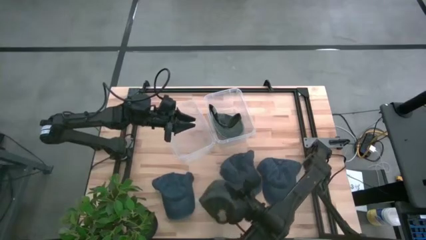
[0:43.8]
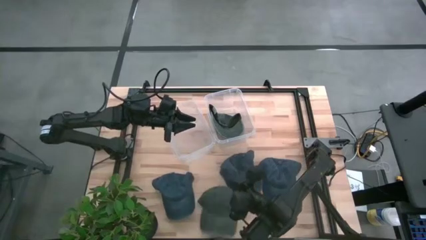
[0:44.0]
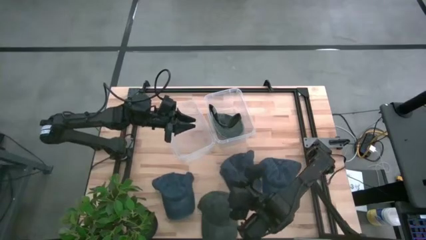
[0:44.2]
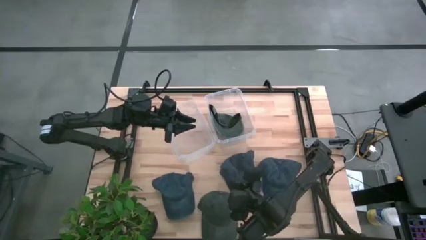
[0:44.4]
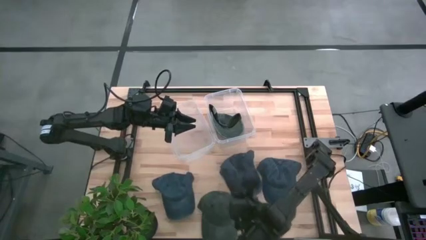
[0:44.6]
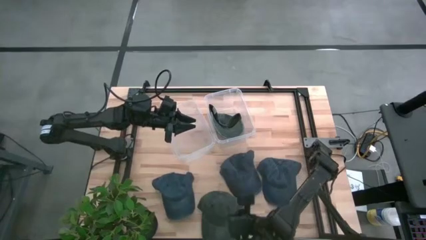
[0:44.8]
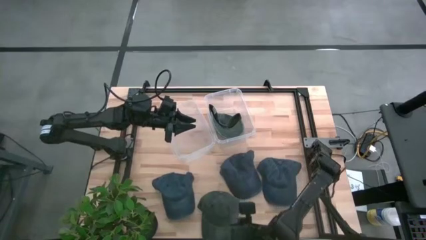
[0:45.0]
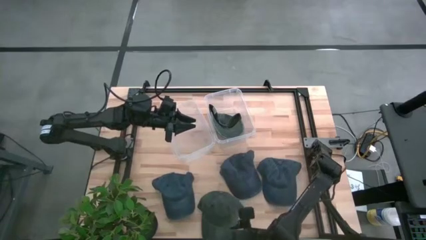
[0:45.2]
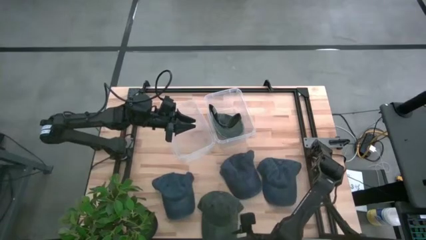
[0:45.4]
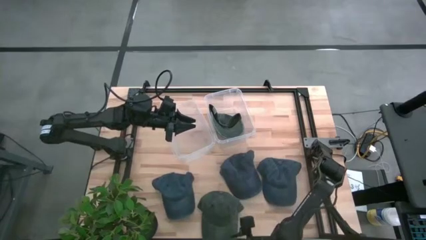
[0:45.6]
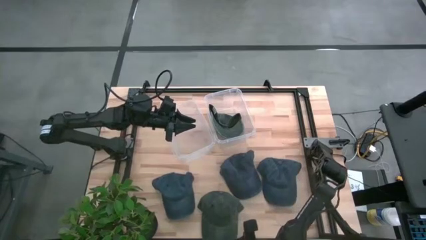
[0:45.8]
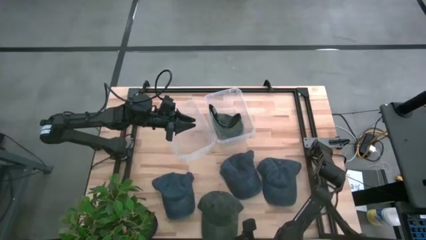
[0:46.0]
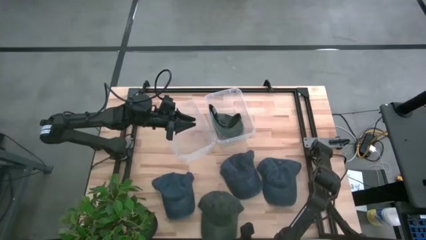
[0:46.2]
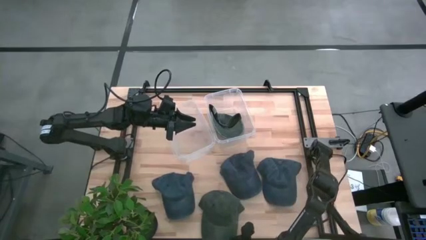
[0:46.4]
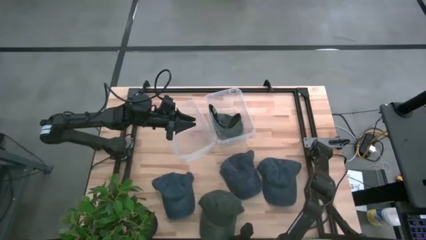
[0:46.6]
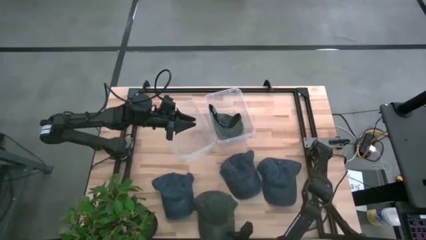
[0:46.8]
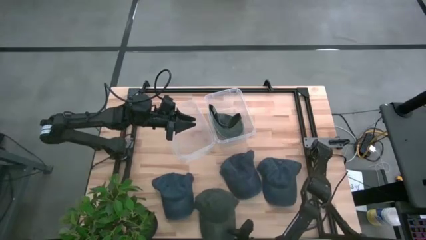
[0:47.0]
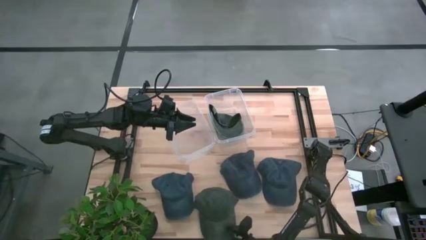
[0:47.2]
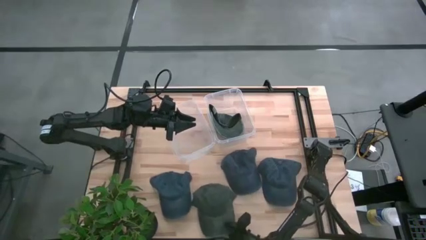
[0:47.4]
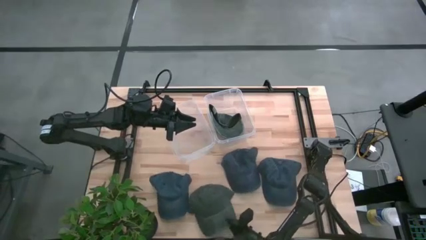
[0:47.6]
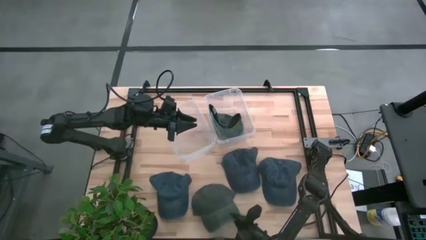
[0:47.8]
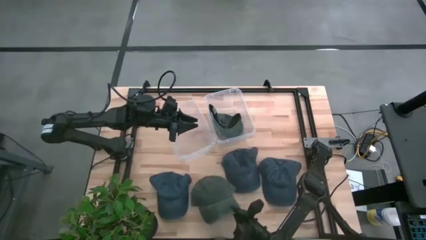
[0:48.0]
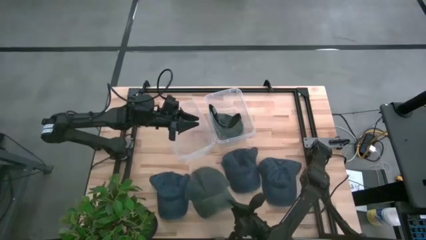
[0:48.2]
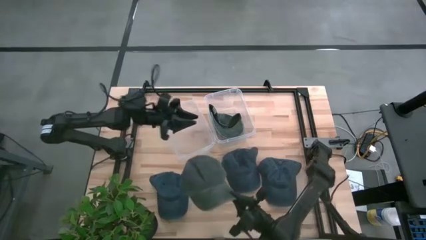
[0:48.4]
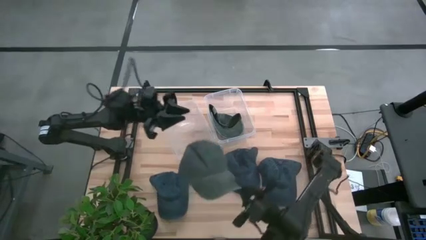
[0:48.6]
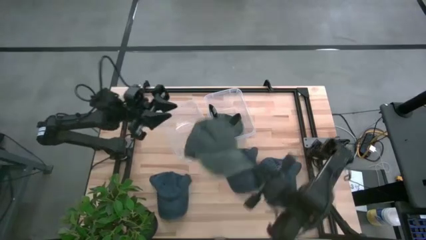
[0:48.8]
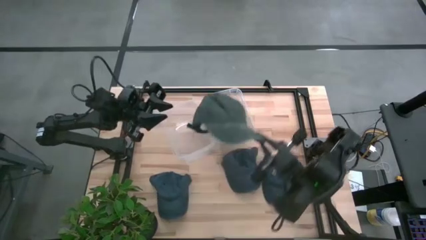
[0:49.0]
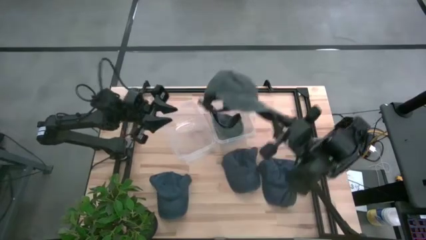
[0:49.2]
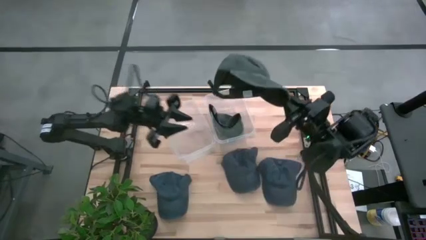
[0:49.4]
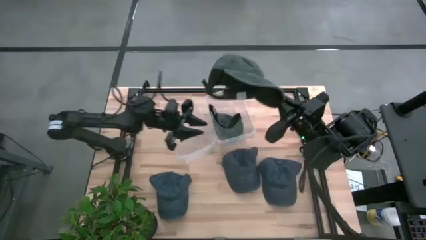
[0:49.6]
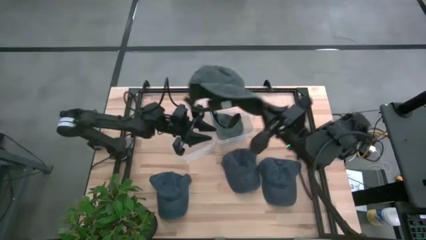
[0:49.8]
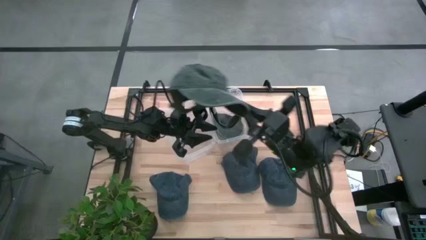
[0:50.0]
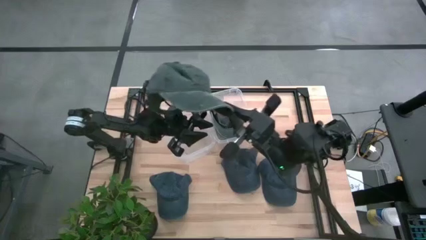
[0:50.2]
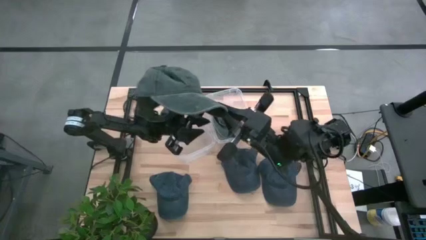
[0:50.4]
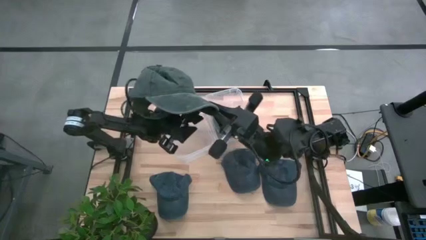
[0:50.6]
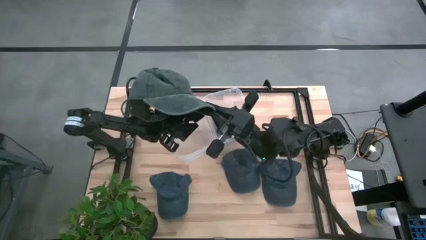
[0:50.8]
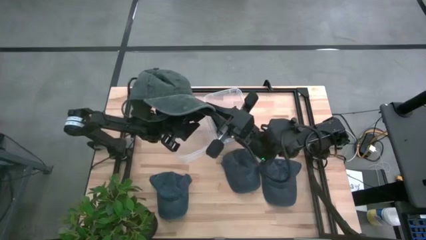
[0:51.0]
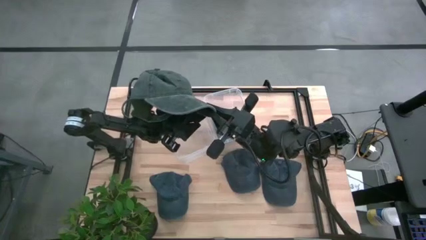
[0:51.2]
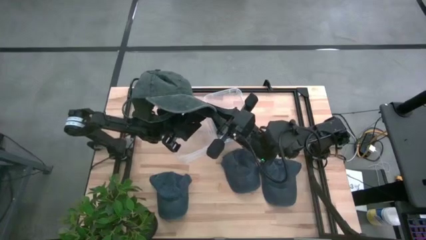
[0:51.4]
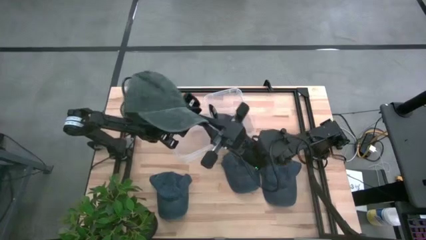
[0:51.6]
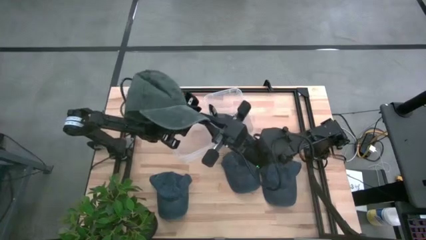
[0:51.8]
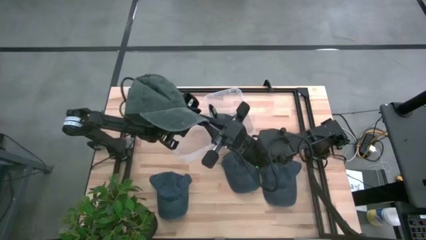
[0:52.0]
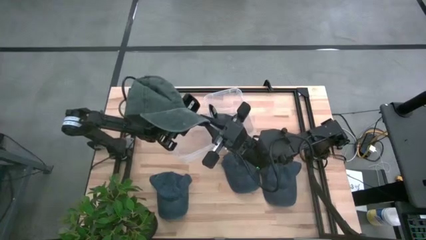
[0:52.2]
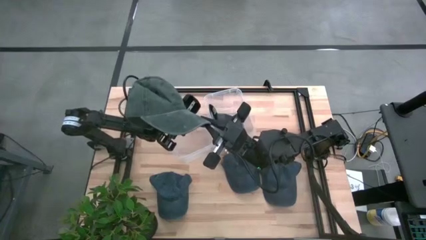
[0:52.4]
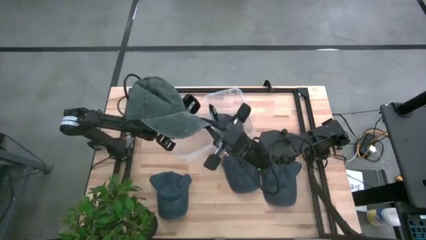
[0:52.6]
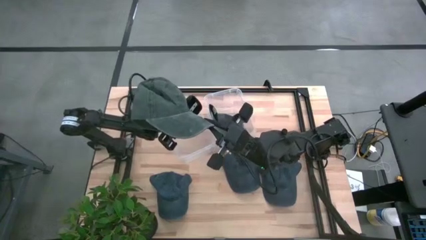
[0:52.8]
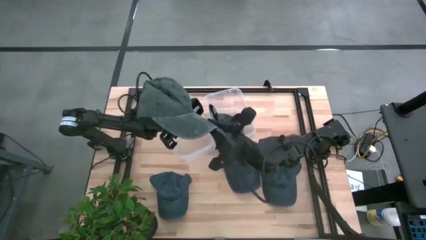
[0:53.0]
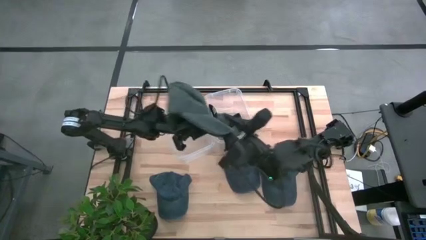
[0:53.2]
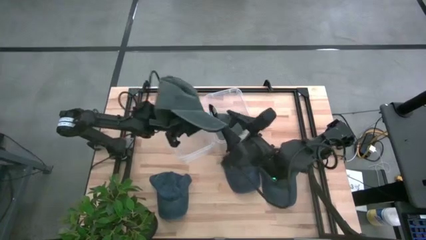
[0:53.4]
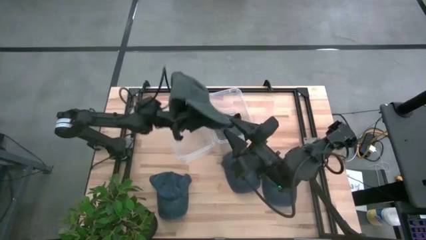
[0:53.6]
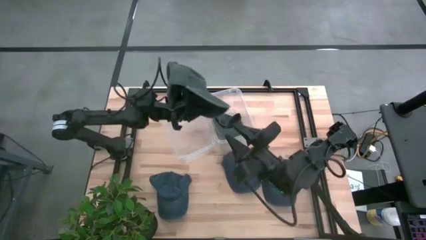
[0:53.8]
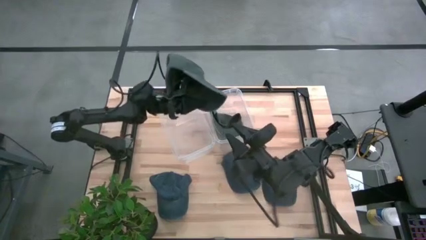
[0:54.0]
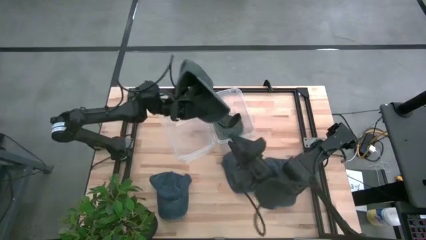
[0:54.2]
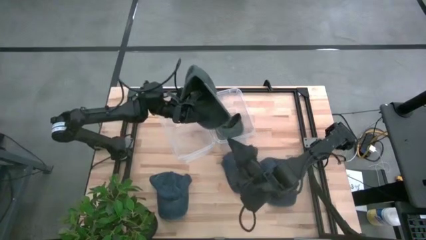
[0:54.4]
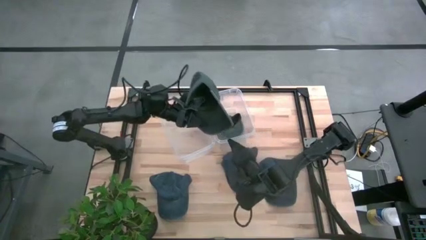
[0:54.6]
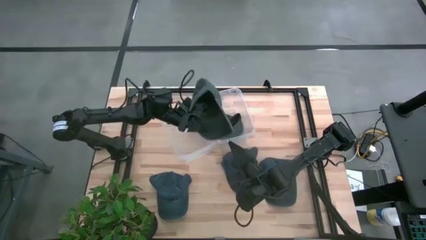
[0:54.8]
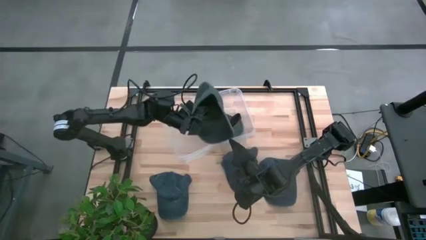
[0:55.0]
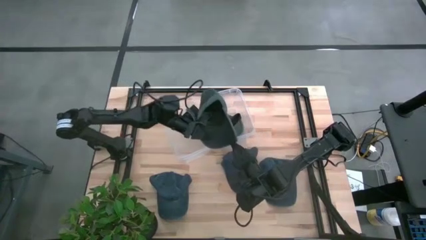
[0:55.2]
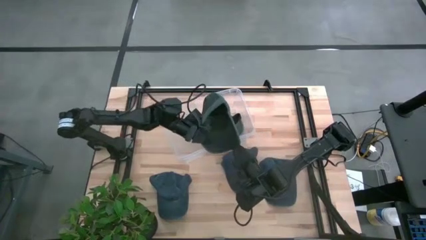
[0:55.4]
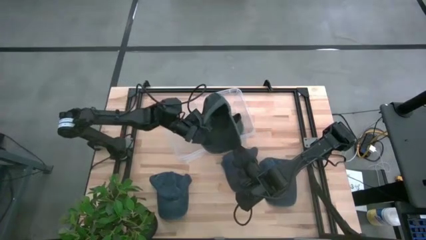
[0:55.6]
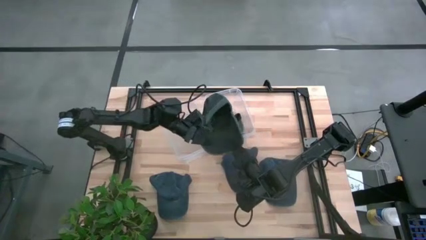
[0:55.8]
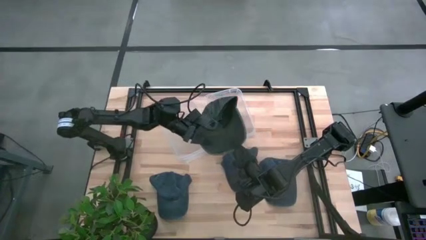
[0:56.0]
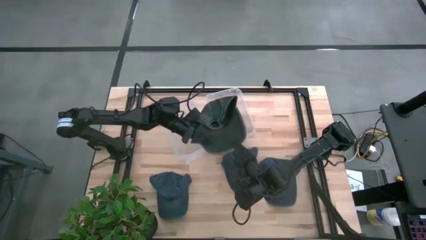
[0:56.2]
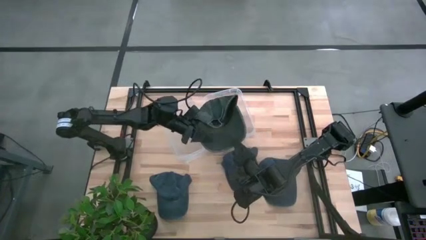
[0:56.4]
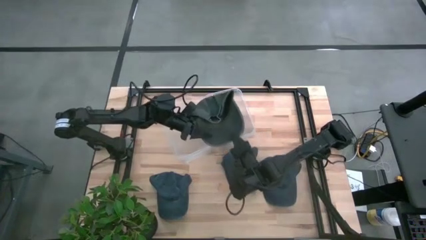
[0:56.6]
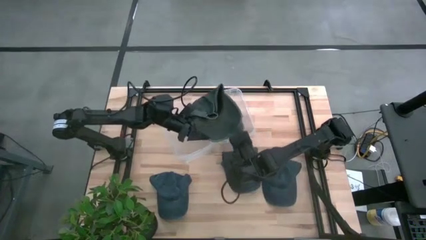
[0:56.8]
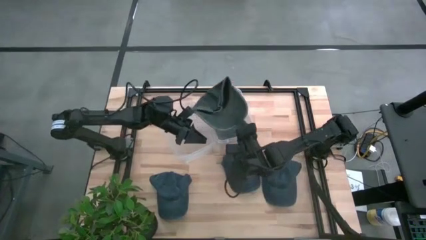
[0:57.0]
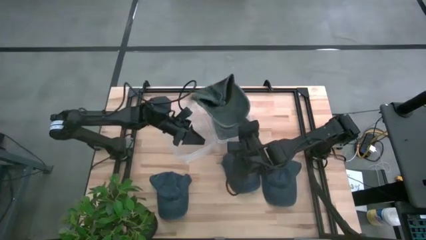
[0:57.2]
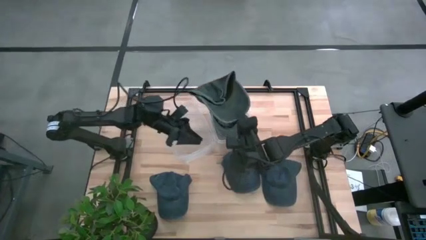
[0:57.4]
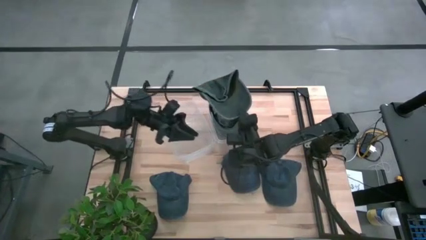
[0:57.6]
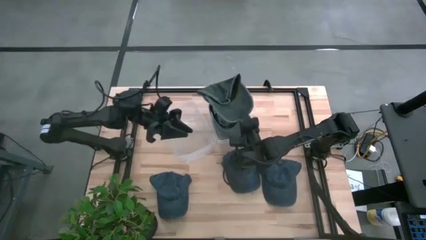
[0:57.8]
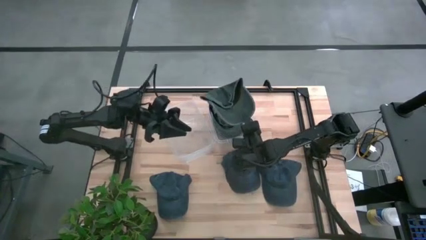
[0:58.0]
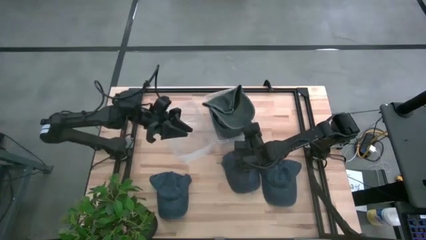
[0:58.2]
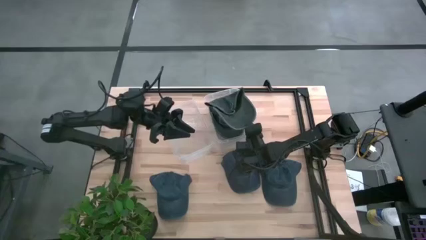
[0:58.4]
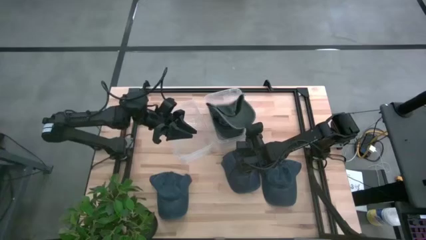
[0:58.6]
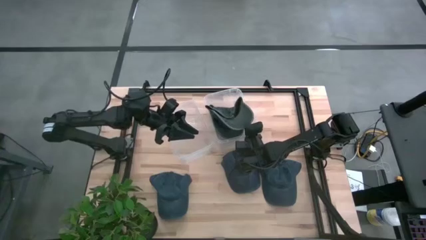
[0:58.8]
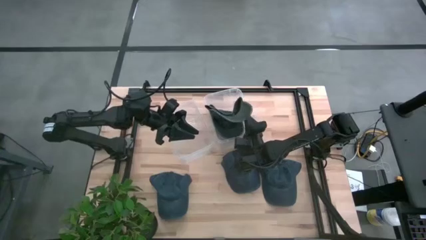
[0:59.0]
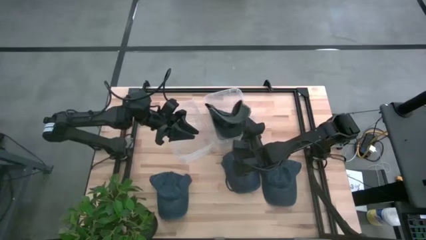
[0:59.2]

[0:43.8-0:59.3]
Task: Pick & Place hat
Put the dark green cap into the right transparent bin
